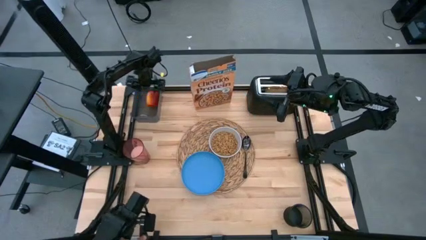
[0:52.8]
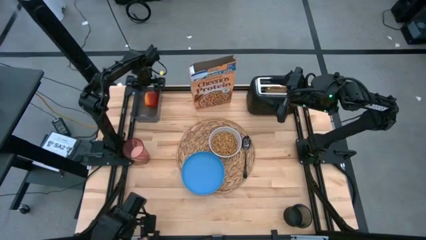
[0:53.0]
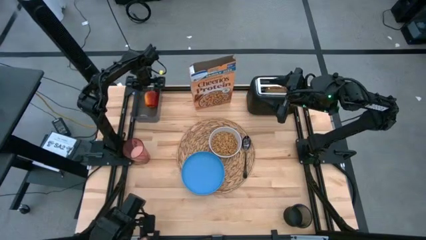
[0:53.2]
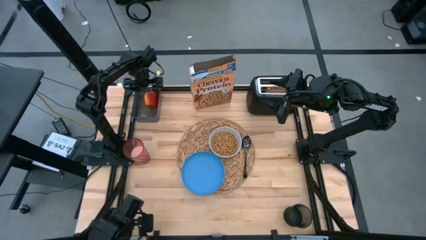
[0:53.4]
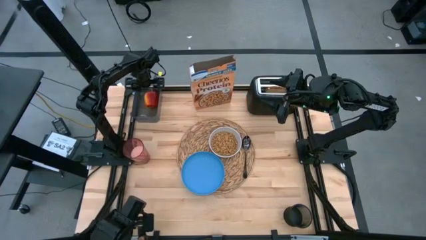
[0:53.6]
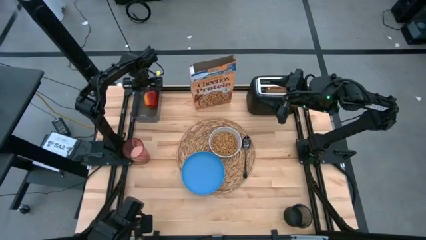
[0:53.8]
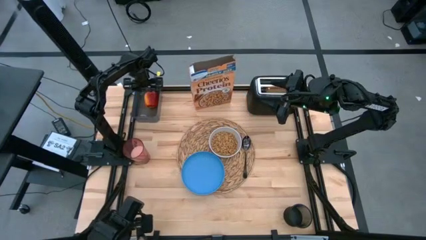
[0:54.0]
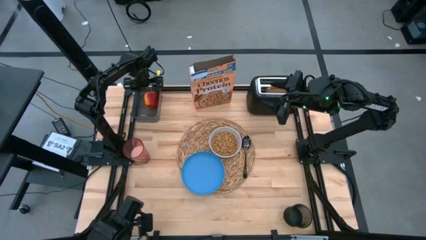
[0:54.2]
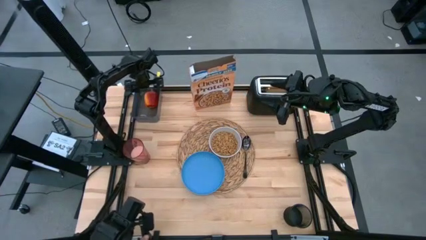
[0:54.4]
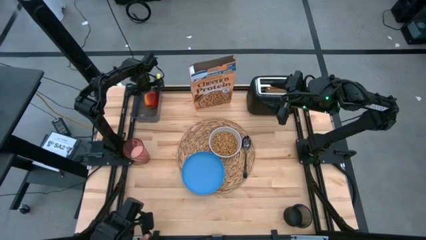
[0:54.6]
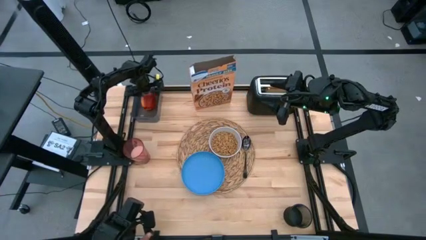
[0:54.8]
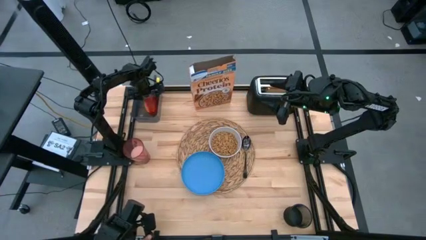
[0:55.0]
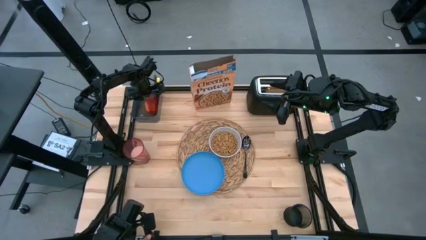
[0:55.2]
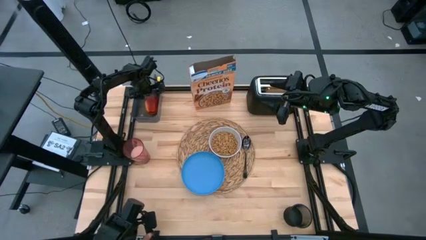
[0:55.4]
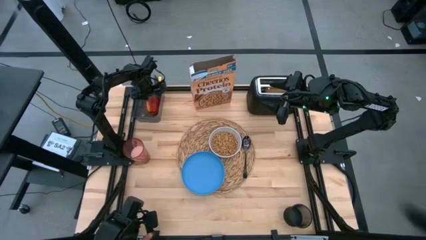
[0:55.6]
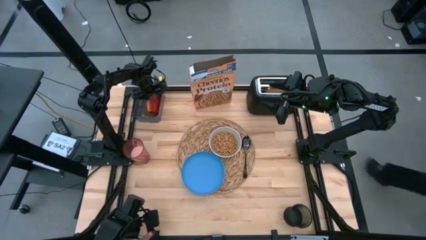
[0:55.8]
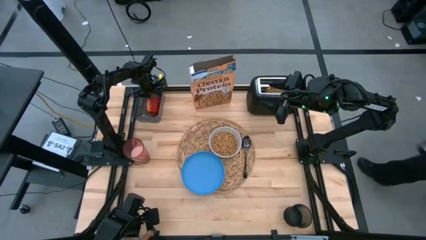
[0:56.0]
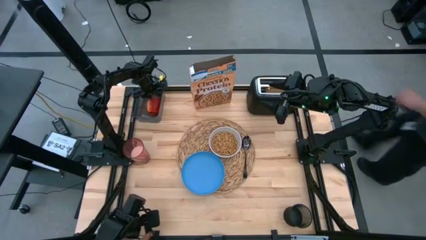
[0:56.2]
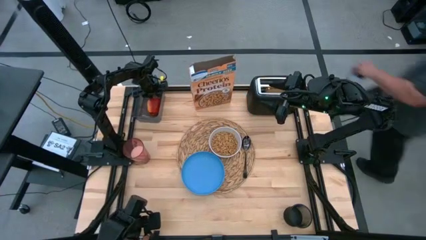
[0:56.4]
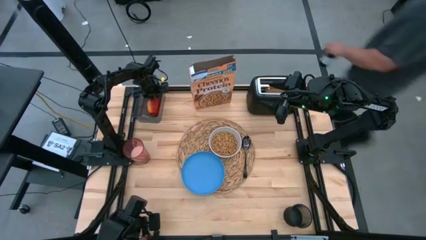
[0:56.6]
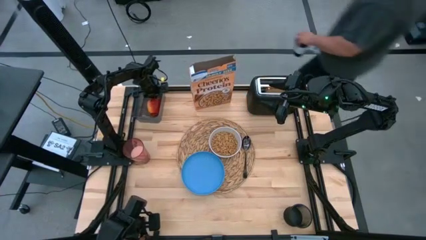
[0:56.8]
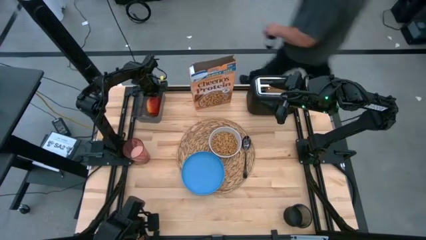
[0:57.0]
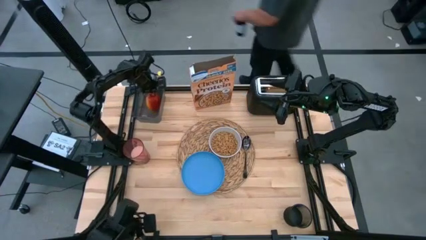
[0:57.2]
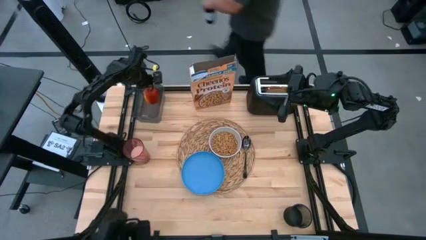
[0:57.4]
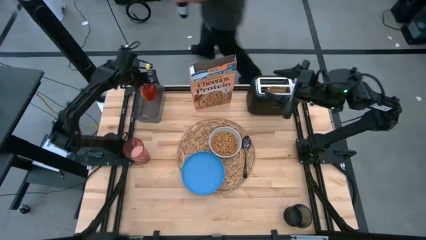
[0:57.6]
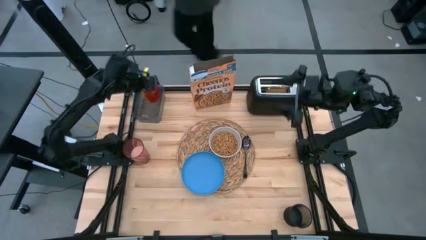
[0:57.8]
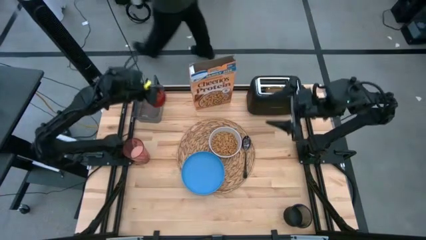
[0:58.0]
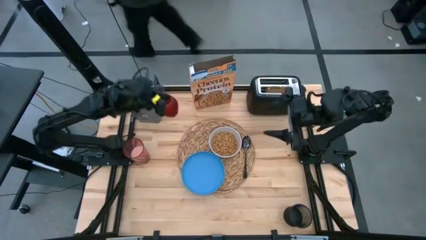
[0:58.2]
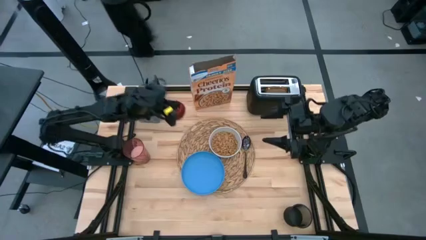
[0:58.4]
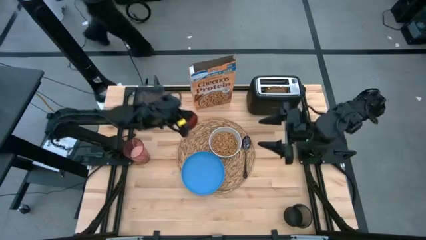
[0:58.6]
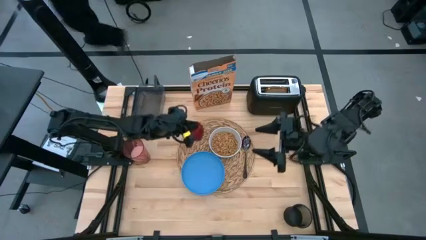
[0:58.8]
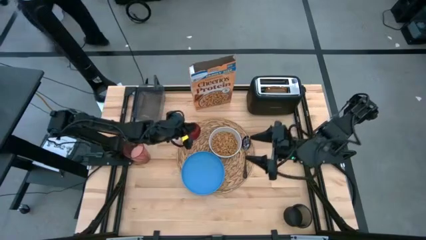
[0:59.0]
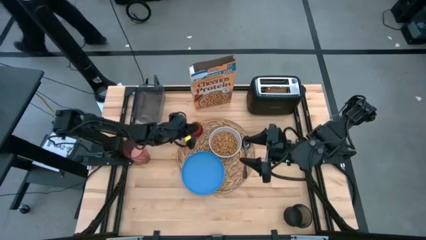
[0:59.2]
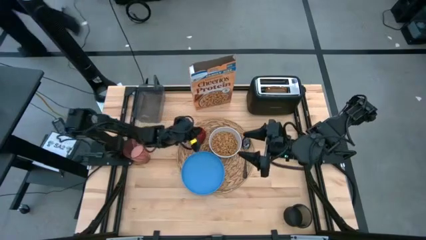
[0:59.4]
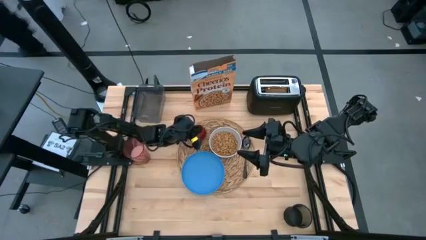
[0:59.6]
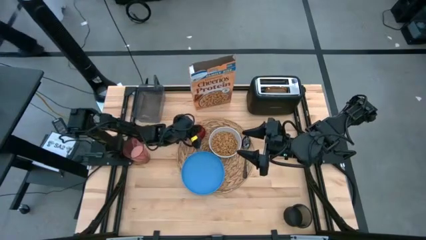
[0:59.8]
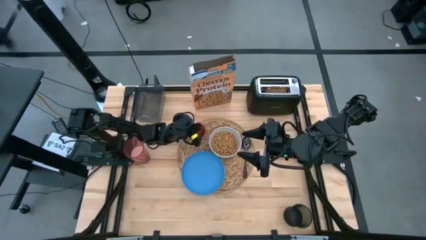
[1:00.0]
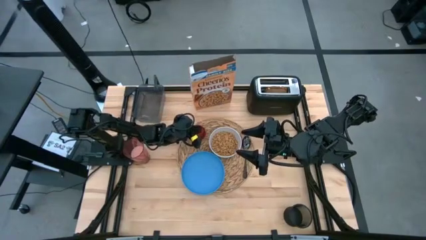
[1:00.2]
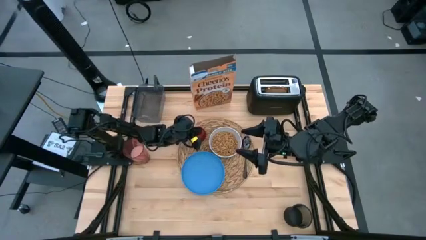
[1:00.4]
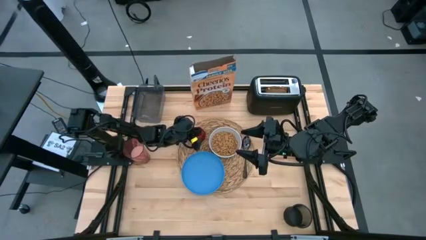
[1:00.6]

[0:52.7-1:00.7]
Task: Arrange a breakfast setting
Put the red apple on the brown table mat to the left of the white bowl

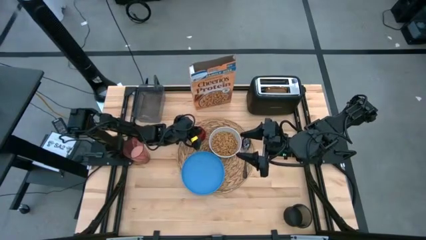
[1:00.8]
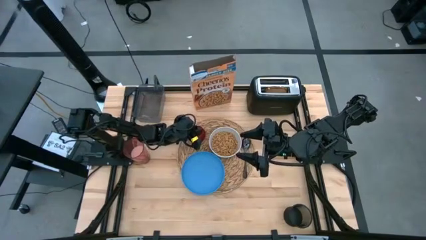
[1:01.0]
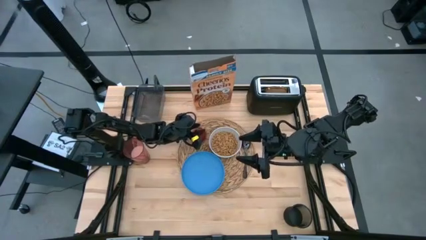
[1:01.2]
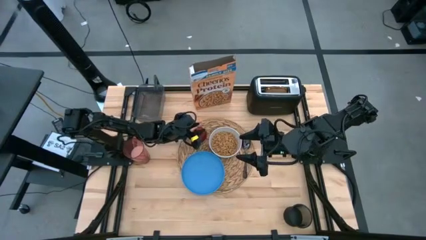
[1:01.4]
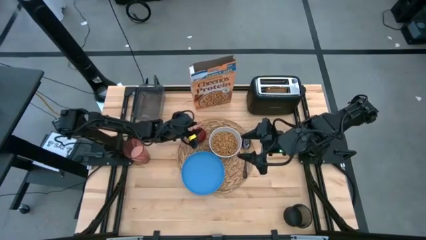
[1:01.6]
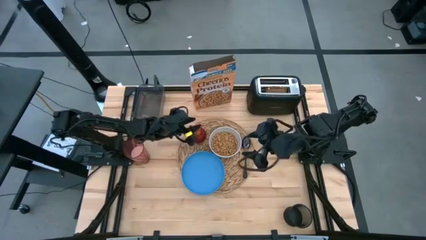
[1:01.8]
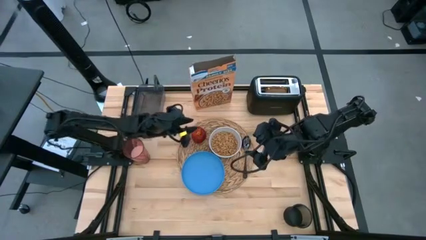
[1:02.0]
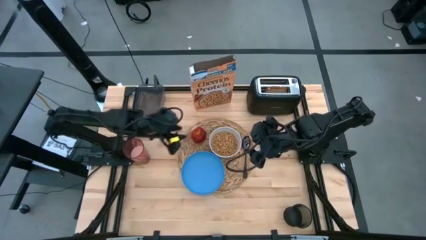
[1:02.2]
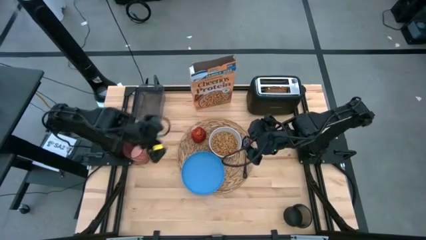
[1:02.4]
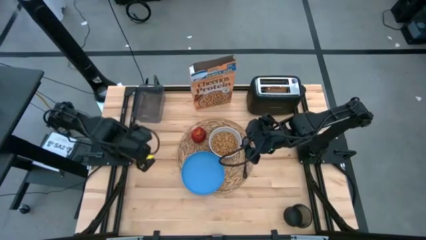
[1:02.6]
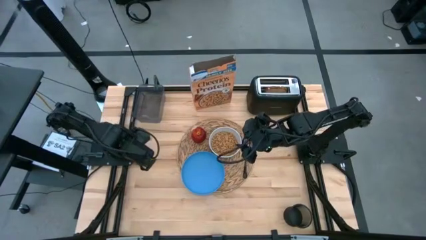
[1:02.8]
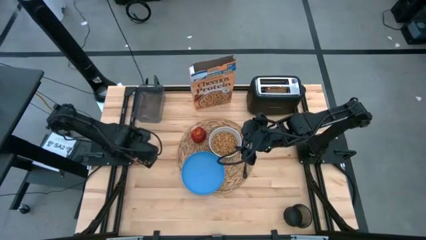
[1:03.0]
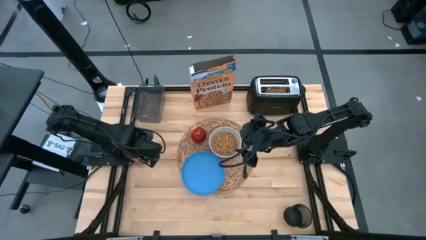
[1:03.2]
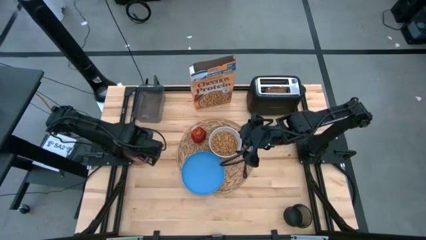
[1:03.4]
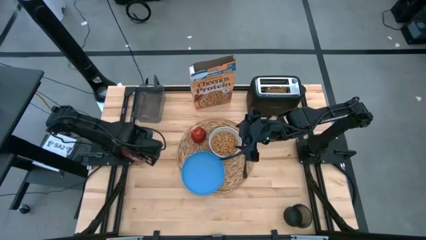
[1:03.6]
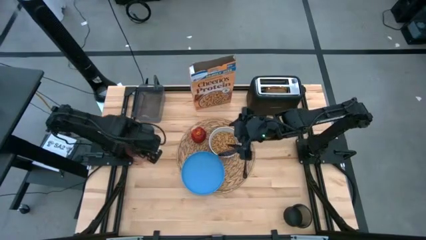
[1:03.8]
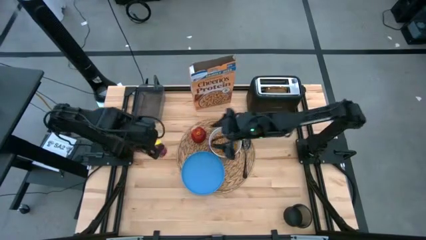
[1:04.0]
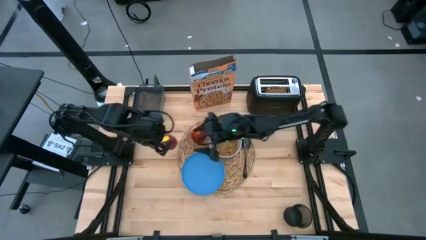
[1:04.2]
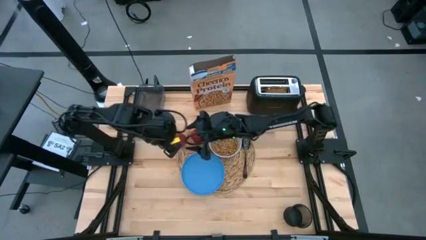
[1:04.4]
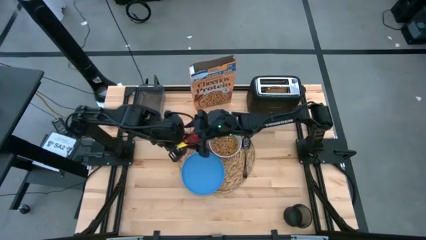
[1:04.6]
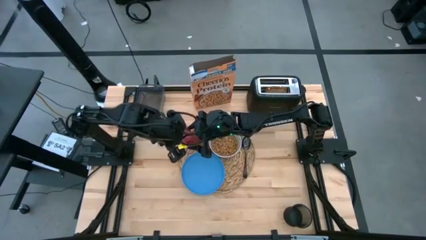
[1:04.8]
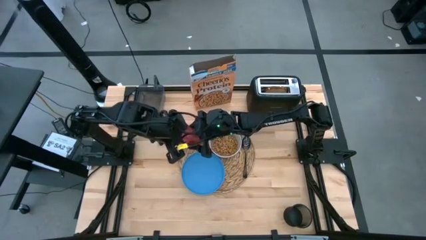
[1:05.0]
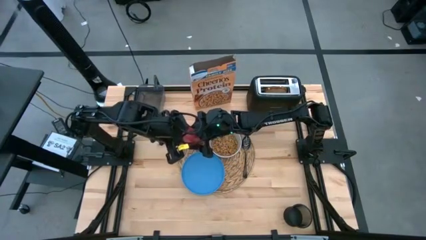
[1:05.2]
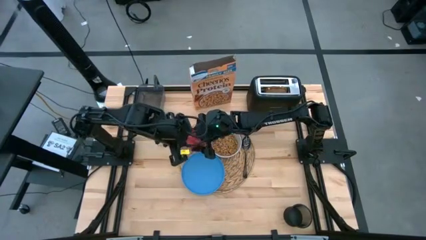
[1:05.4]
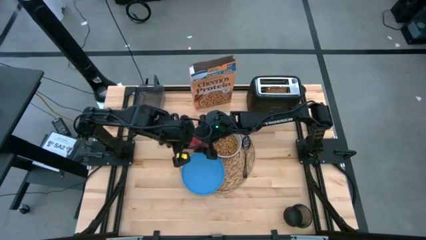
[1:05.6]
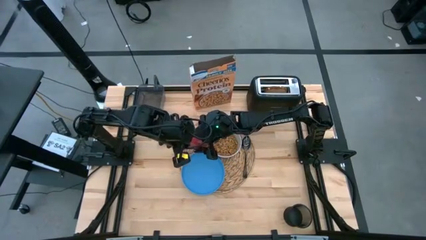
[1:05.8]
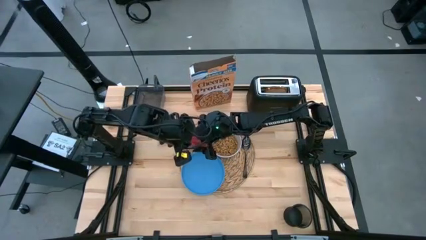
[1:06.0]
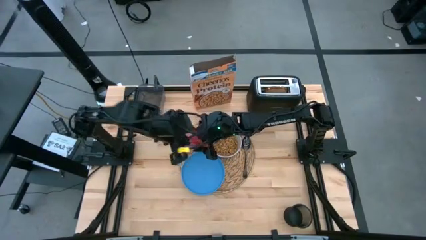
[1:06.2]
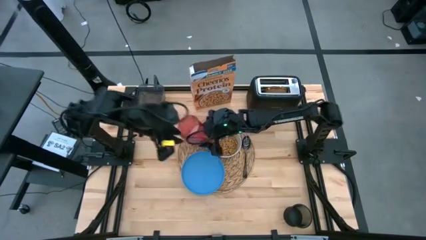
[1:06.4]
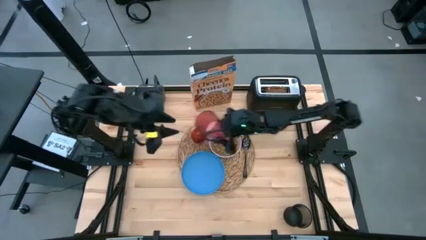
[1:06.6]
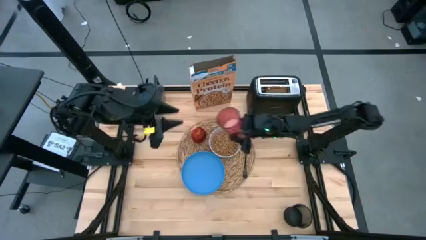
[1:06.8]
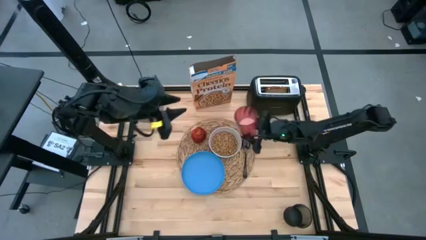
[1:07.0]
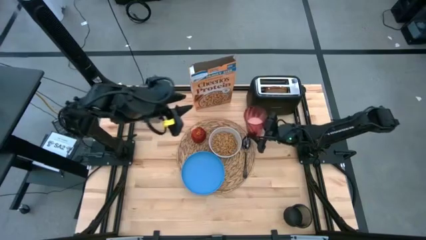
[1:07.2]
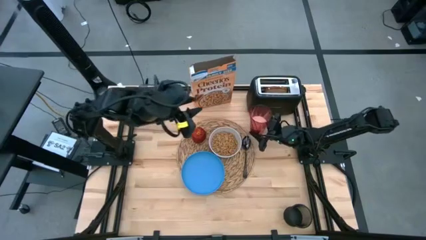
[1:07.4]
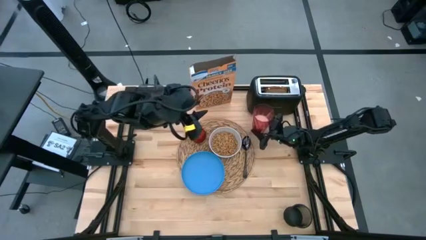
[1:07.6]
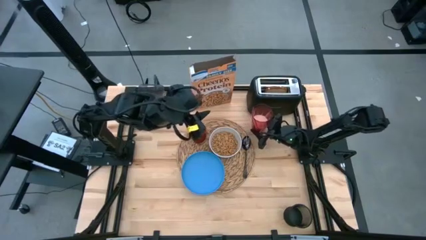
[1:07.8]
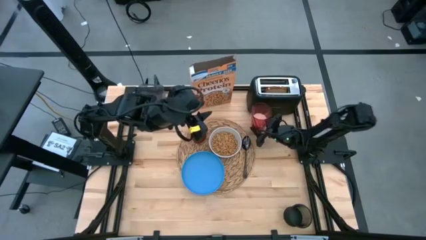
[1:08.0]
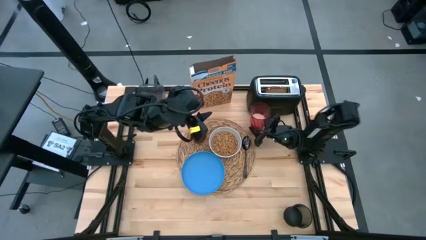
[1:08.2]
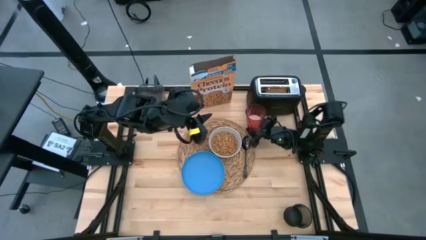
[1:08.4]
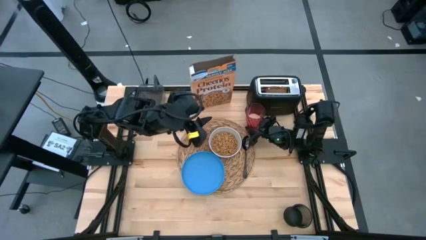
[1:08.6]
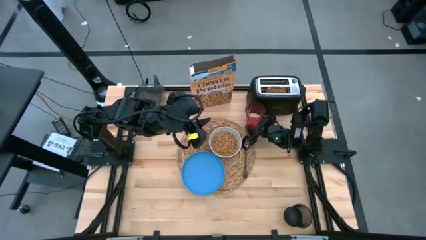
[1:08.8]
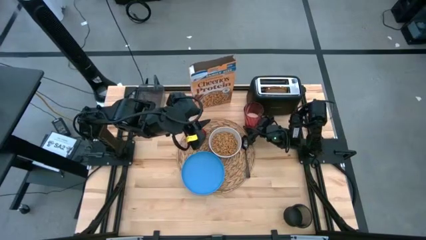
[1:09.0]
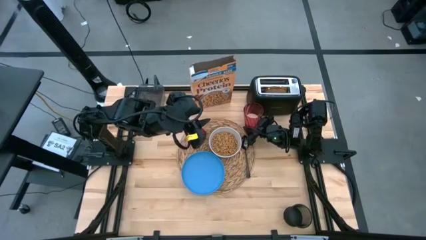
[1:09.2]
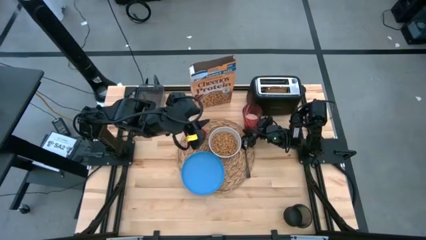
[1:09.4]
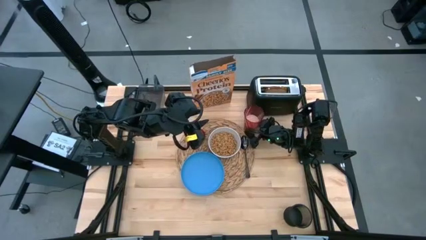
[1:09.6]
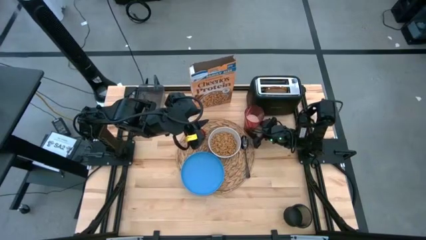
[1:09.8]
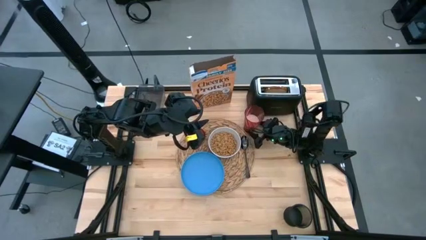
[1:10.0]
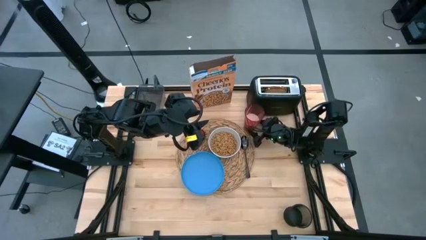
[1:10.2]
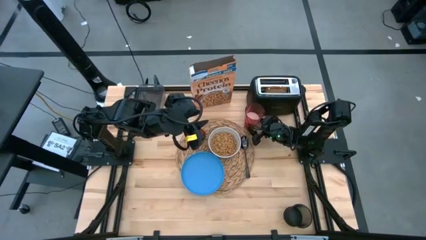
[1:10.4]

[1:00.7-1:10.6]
Put the glass of milk to the top of the black spoon
